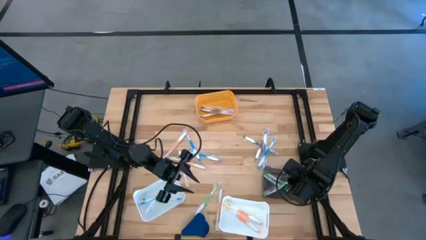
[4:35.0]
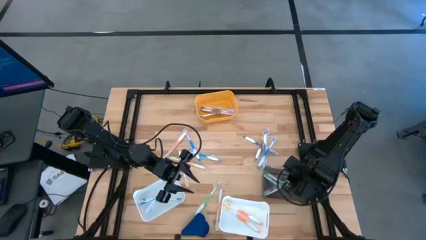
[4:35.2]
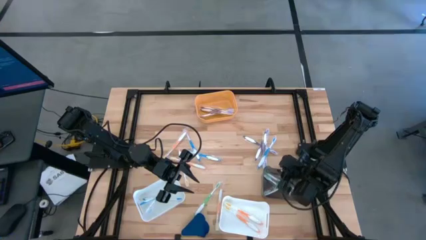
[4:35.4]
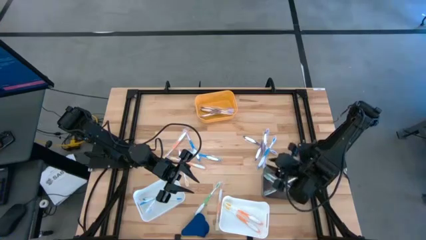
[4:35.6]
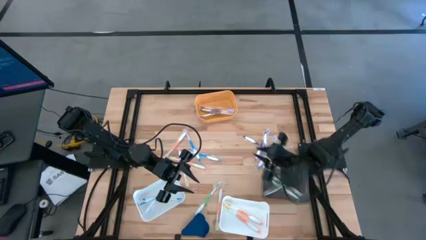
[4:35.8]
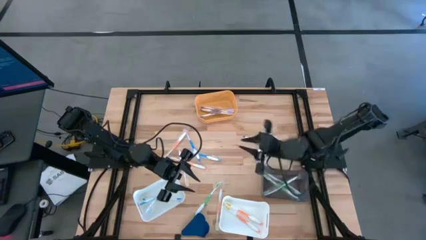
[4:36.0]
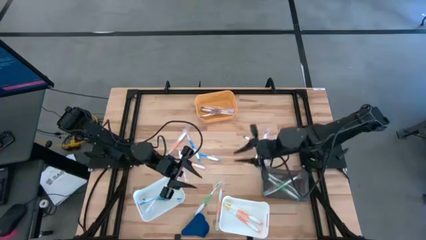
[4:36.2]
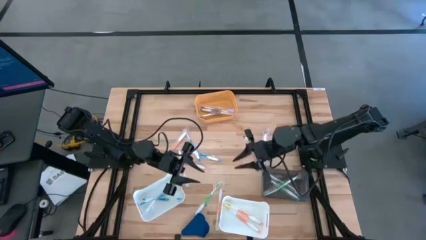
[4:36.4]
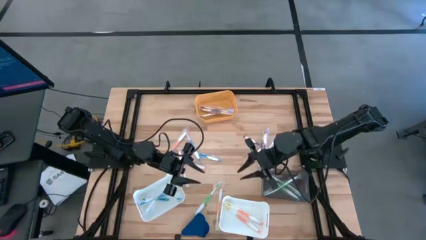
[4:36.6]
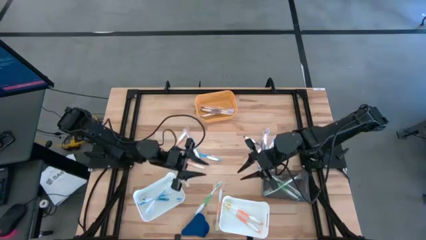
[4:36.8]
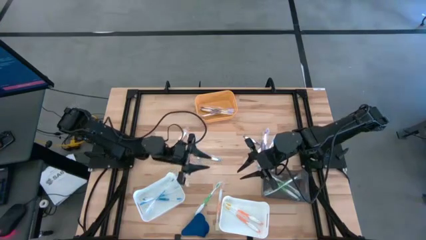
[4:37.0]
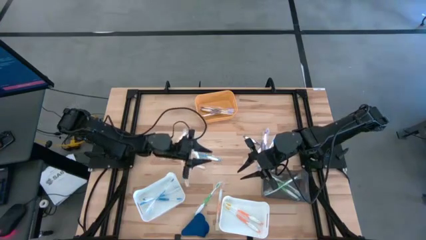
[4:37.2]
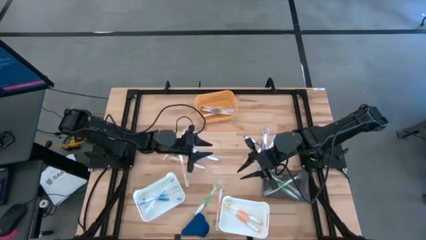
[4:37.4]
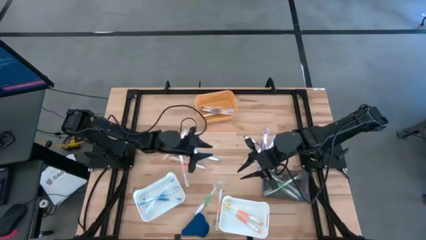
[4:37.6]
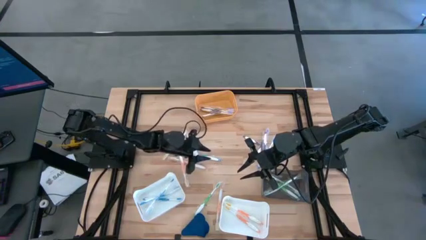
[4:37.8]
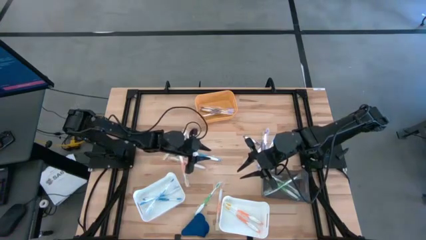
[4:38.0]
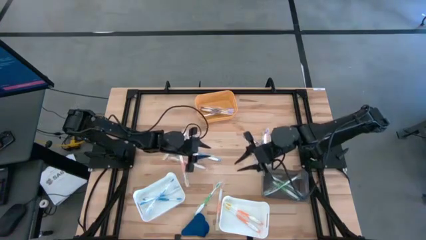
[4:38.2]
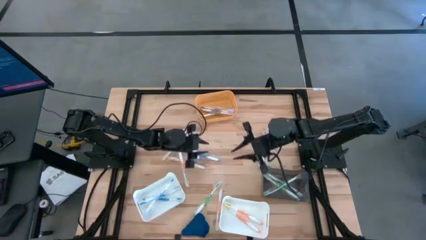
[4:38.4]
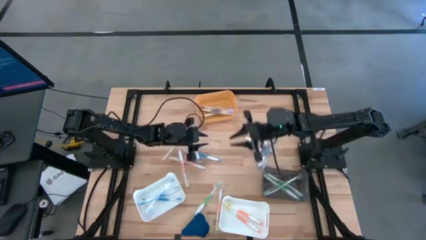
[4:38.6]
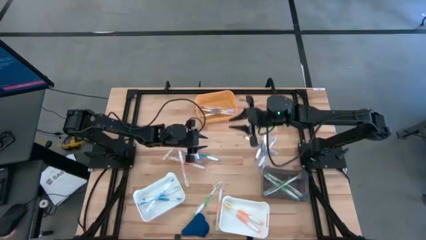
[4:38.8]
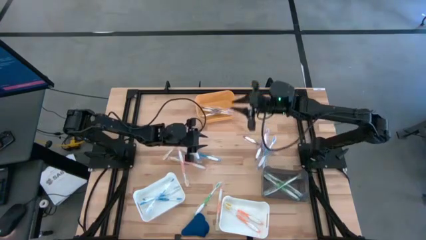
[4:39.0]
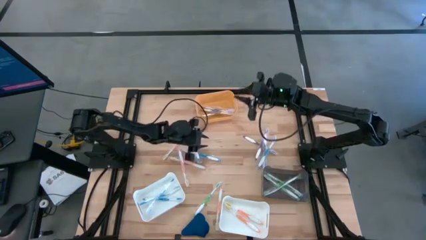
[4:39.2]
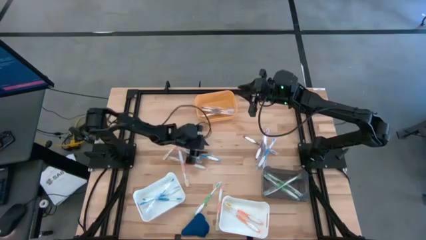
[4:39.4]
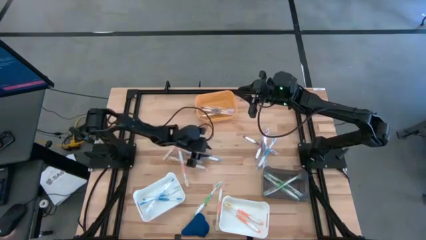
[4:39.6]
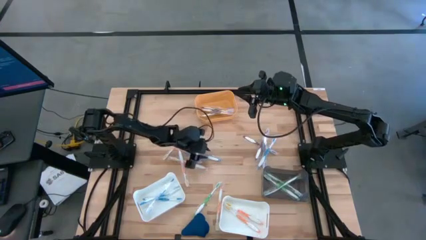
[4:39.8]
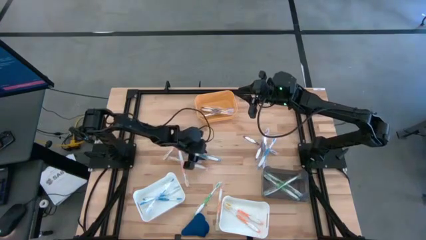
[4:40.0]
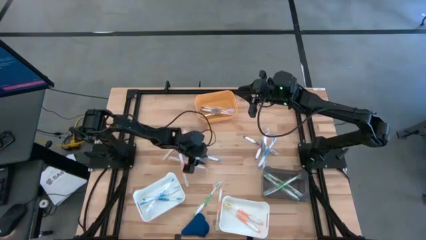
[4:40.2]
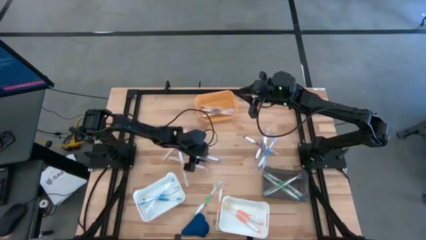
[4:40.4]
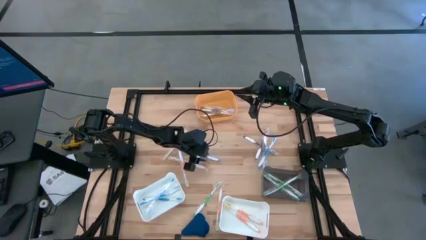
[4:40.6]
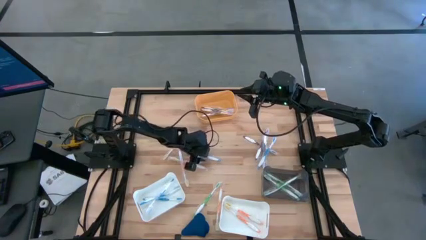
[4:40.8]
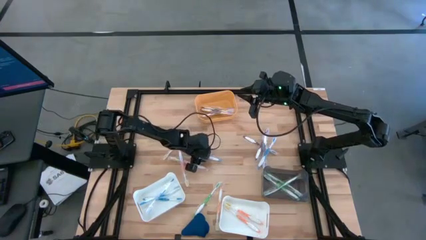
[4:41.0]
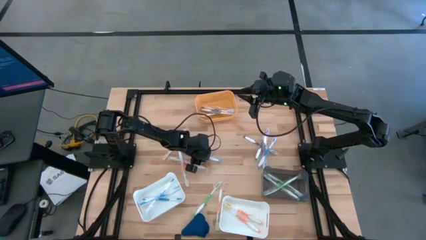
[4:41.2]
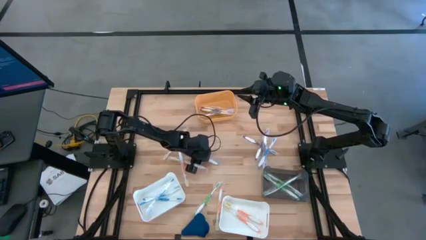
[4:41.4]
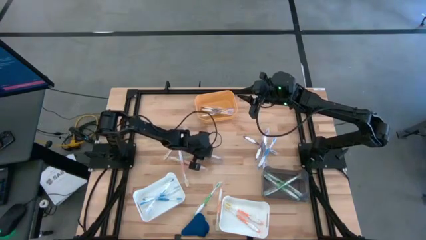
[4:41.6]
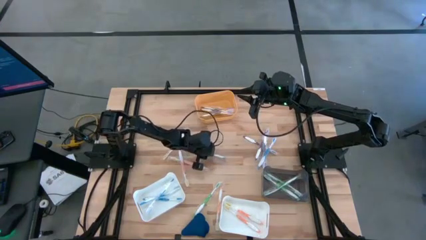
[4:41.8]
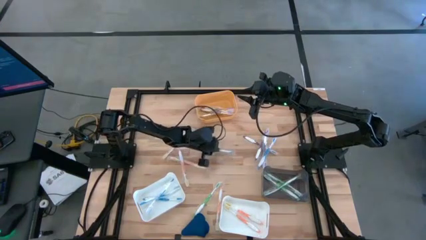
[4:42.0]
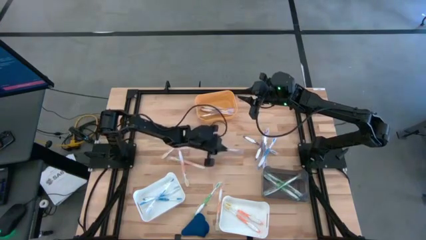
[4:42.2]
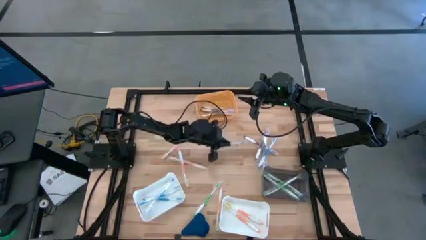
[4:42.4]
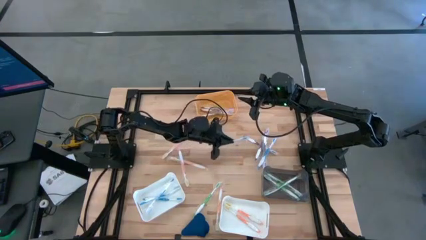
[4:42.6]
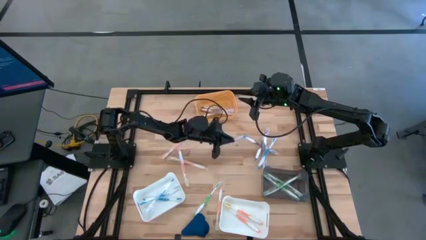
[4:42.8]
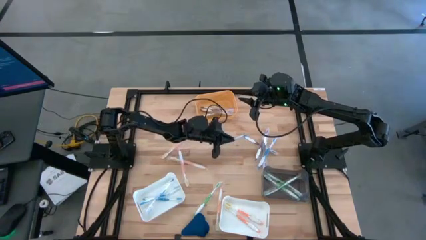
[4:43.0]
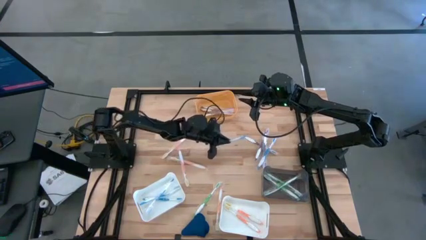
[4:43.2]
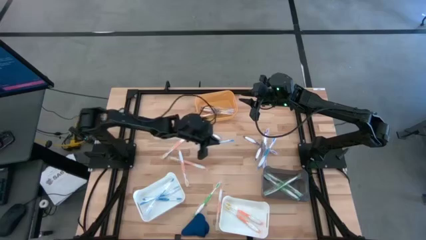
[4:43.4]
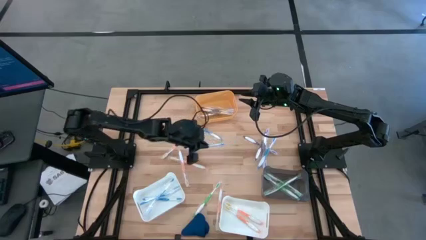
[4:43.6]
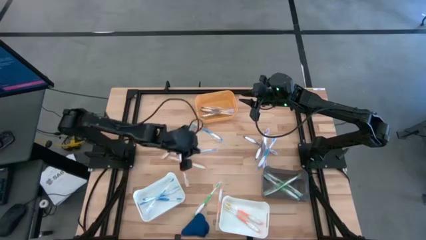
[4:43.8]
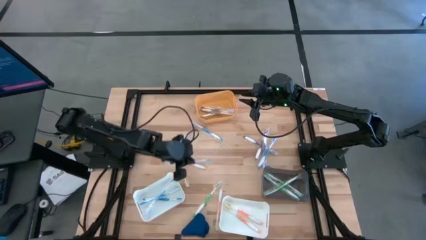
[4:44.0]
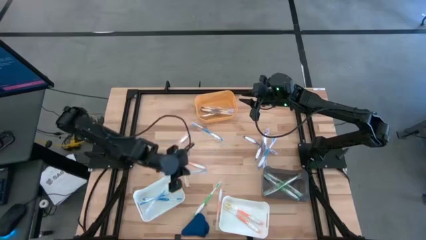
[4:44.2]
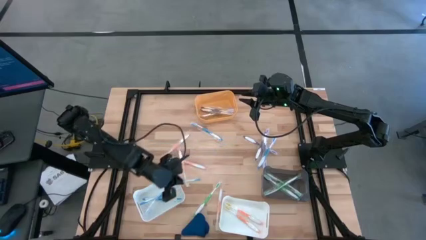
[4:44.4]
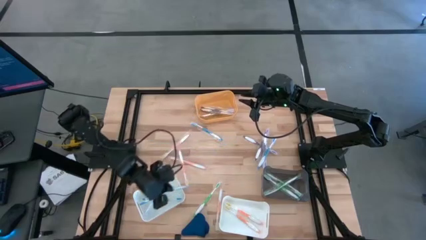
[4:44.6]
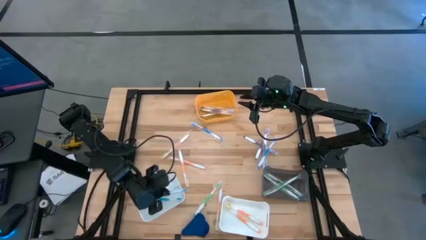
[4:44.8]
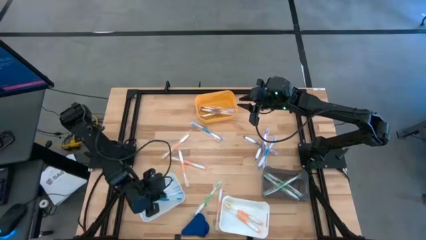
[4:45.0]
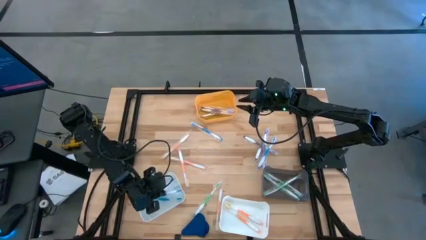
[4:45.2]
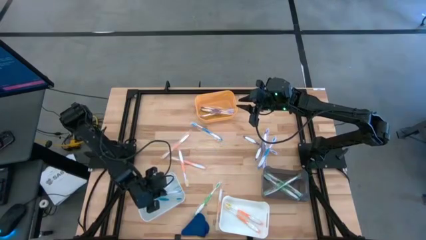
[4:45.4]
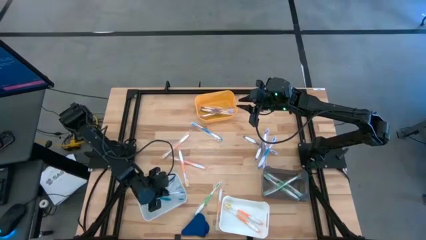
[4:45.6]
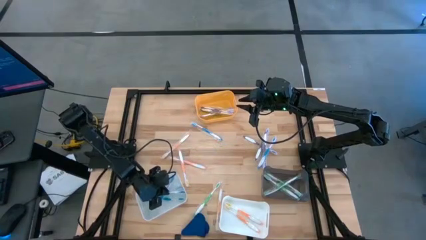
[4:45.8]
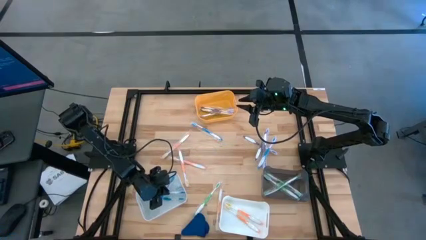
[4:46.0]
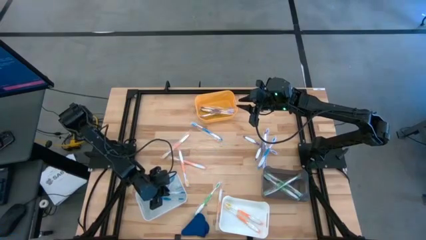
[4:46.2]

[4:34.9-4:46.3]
Task: Pick & Place Toothbrushes
Put the blue toothbrush into the left white bin

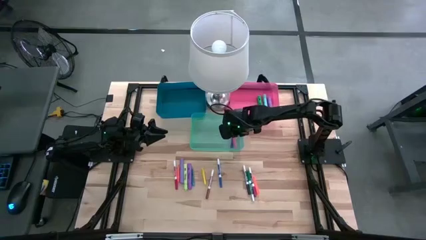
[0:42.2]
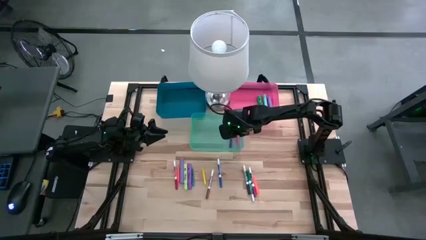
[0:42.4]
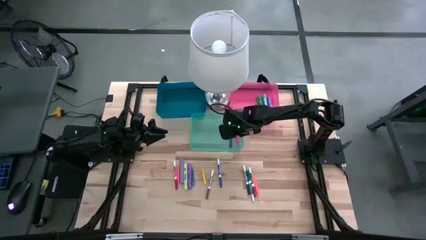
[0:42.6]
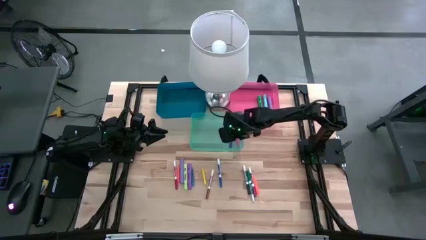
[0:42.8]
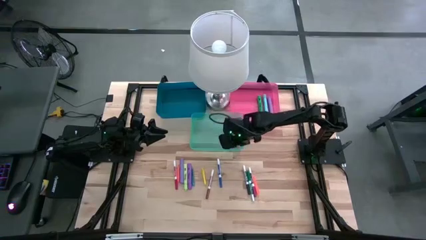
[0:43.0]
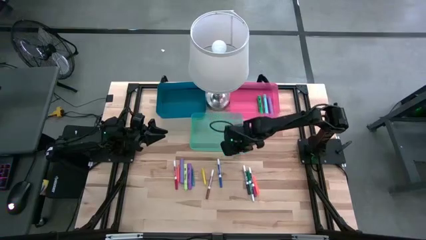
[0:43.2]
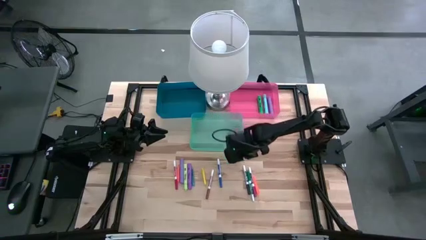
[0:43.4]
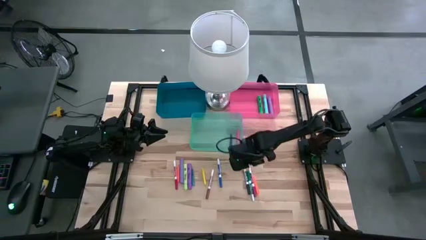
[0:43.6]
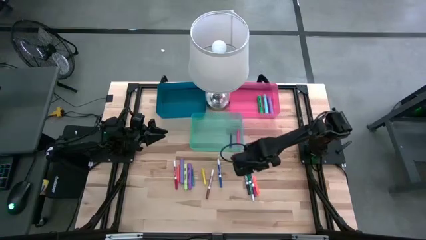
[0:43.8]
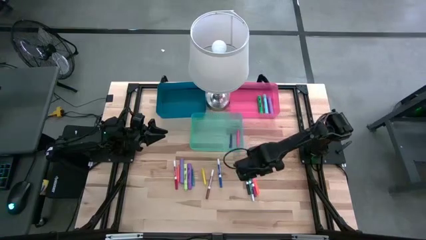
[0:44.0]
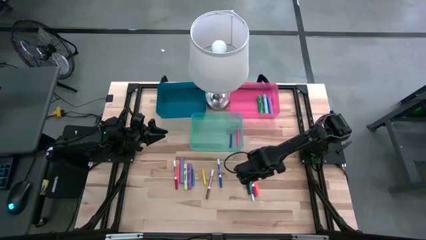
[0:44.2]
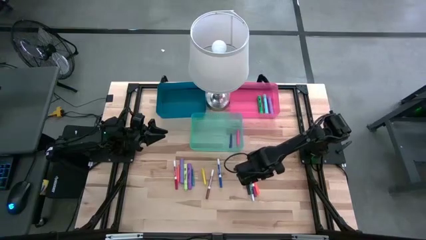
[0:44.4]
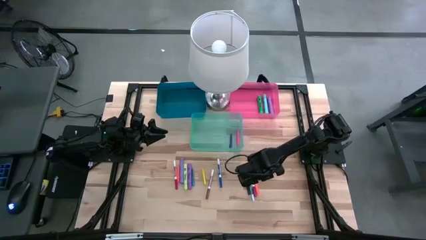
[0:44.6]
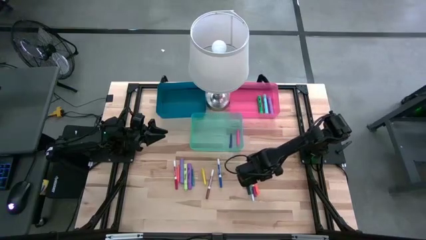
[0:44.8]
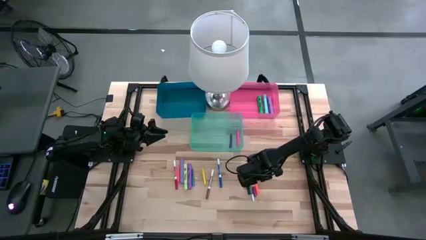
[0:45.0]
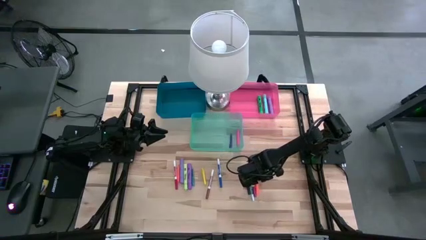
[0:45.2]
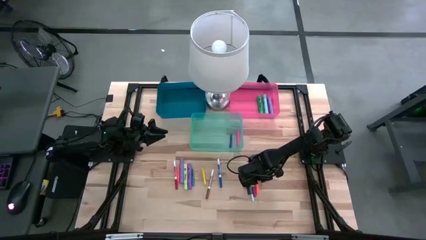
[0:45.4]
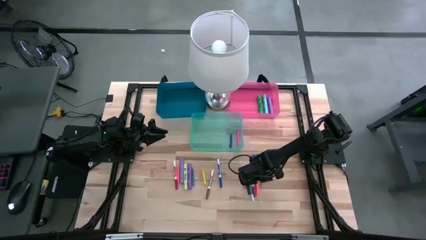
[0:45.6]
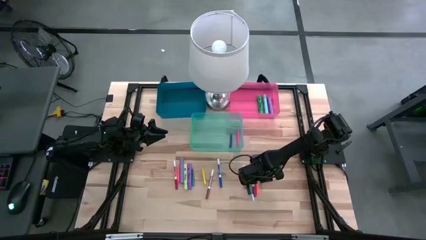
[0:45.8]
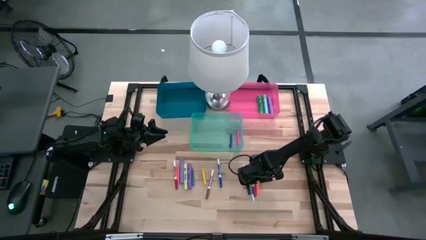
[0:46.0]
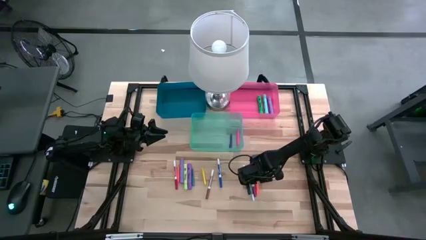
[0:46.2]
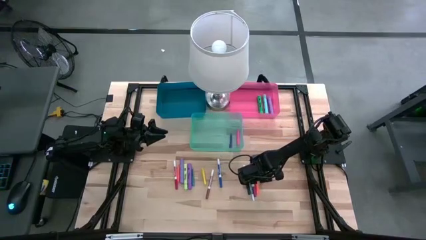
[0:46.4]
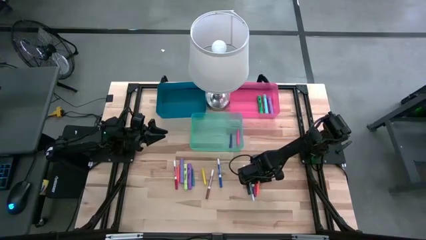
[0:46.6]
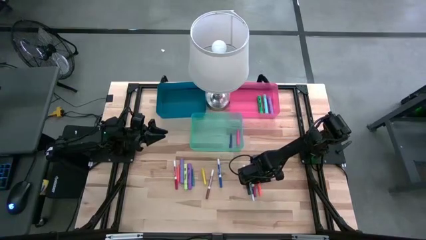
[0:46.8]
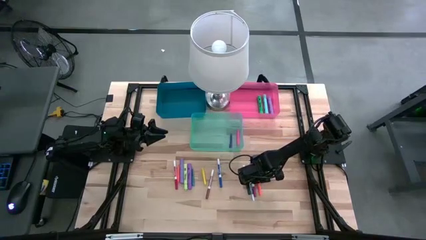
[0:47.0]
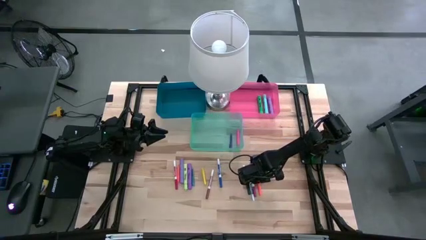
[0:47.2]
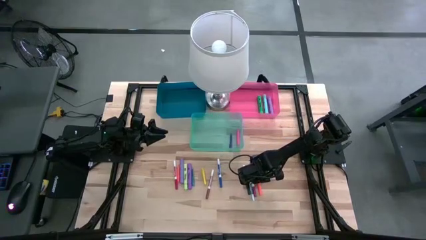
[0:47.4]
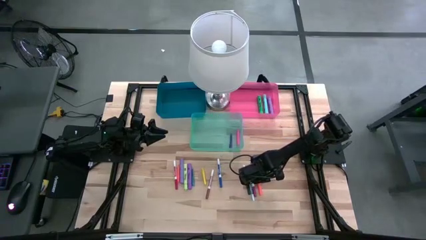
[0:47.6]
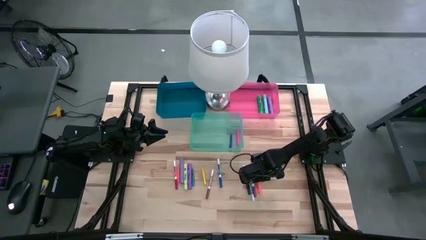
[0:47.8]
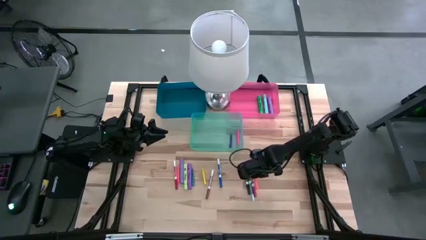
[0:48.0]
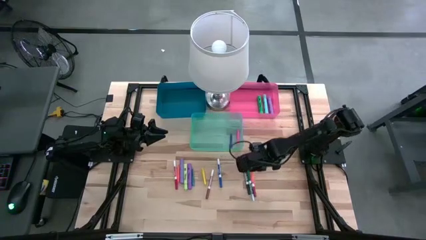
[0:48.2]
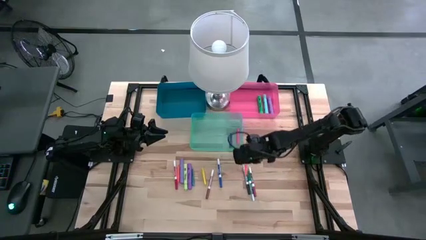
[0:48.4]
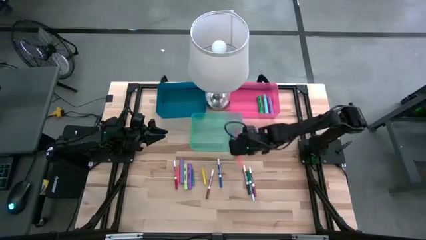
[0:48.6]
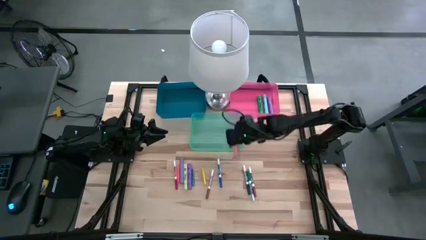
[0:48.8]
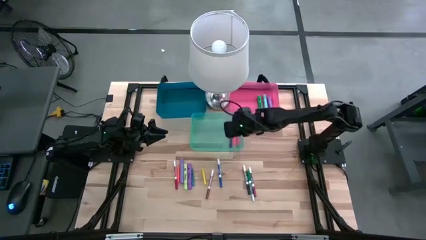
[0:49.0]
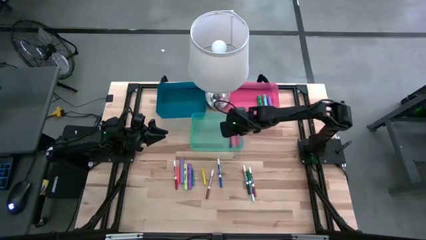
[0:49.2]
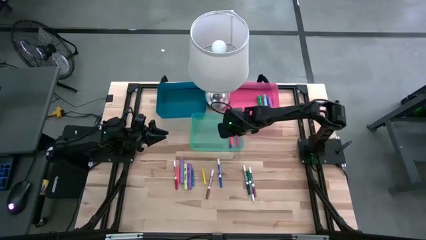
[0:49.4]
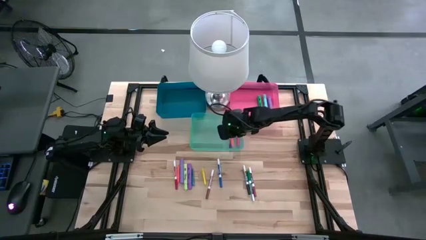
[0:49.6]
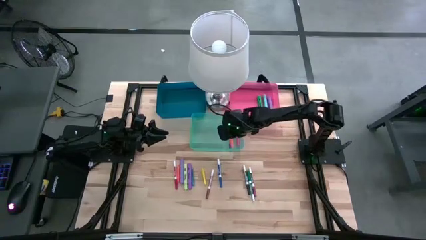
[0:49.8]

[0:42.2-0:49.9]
Task: Pick & Place Markers
Put the right orange pen into the green bin
